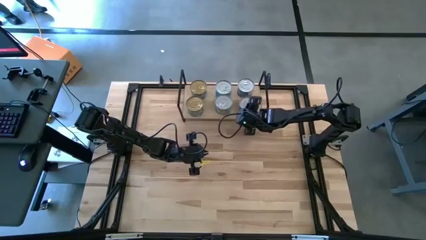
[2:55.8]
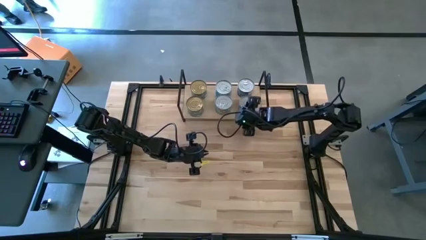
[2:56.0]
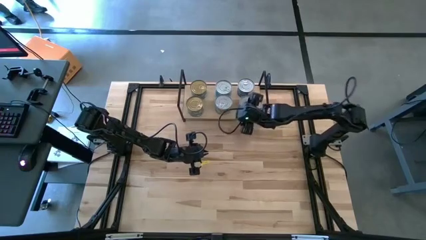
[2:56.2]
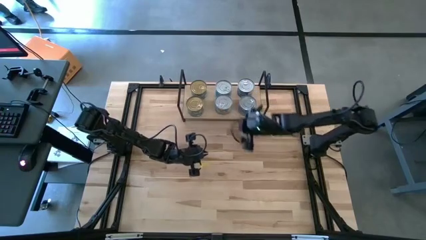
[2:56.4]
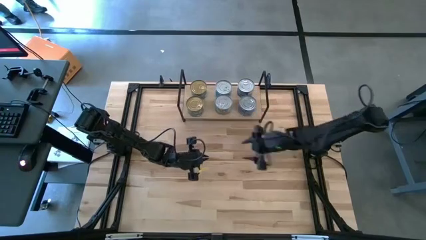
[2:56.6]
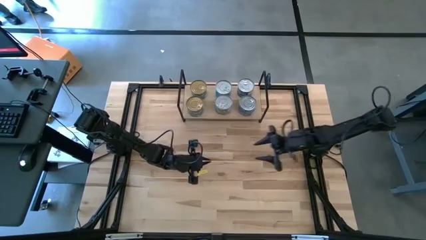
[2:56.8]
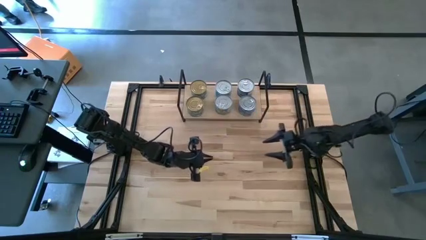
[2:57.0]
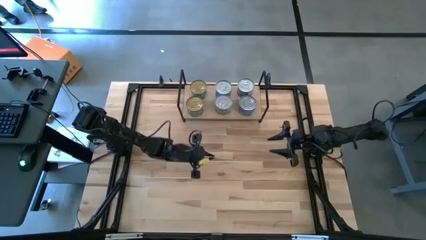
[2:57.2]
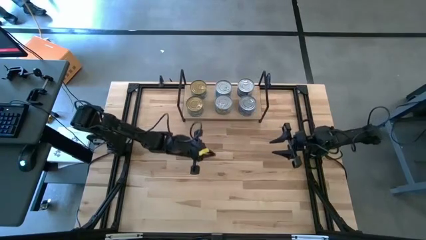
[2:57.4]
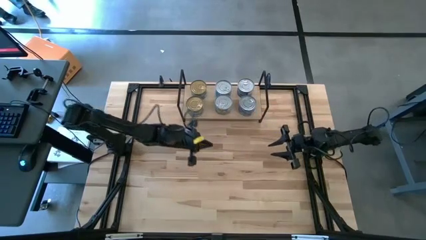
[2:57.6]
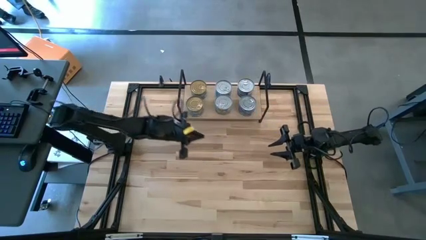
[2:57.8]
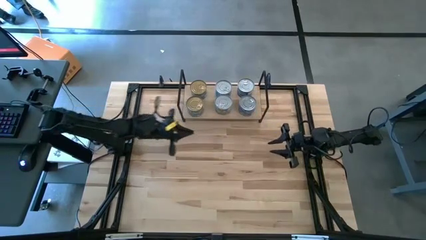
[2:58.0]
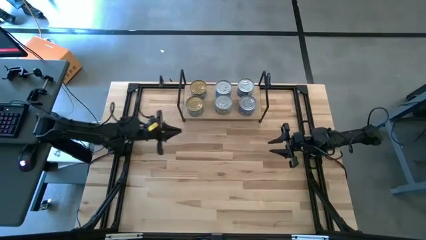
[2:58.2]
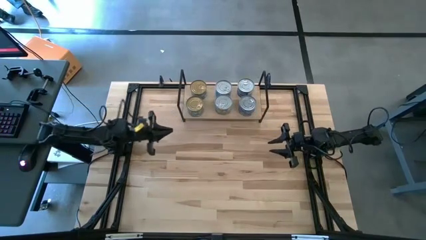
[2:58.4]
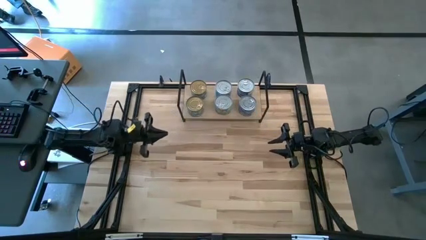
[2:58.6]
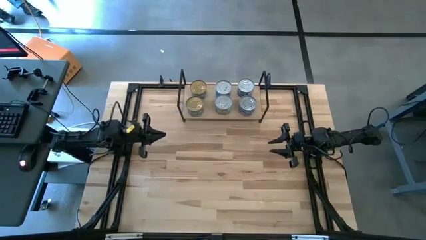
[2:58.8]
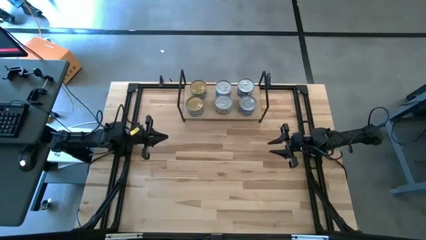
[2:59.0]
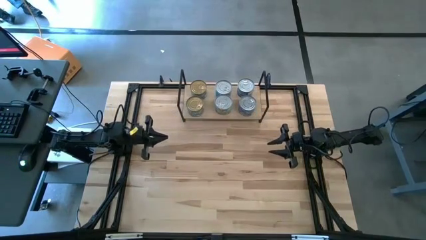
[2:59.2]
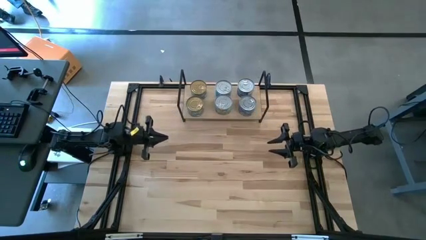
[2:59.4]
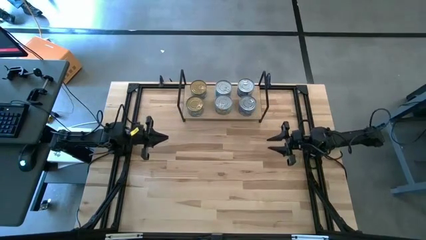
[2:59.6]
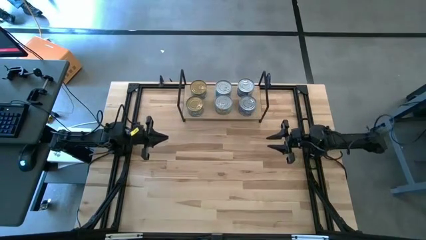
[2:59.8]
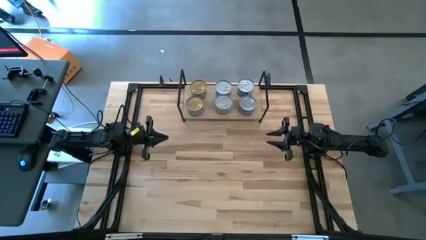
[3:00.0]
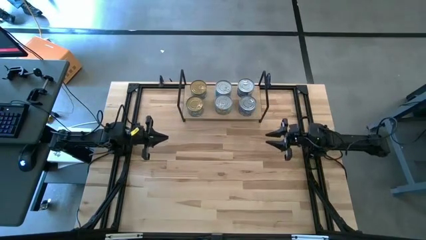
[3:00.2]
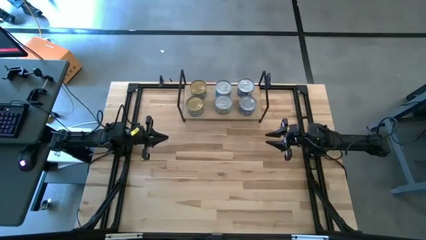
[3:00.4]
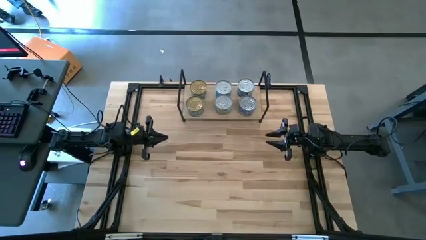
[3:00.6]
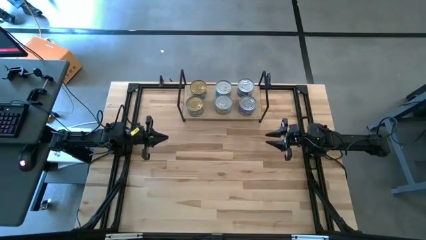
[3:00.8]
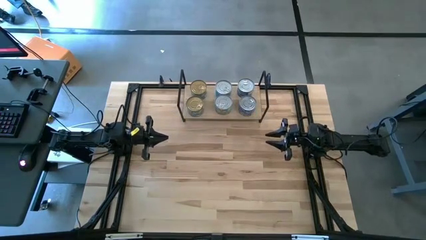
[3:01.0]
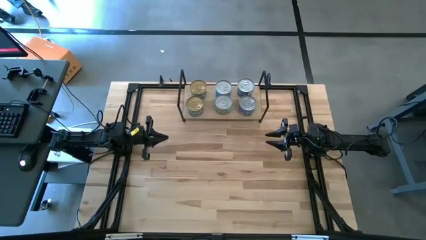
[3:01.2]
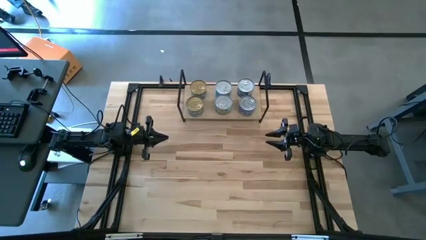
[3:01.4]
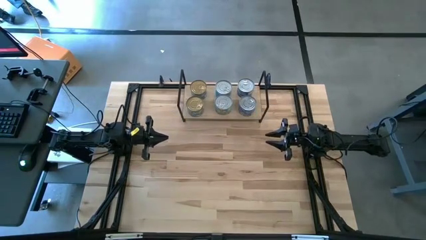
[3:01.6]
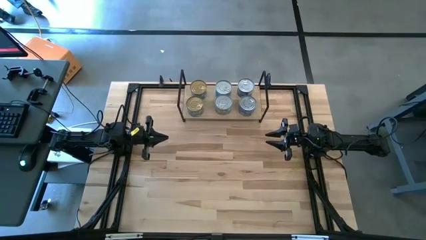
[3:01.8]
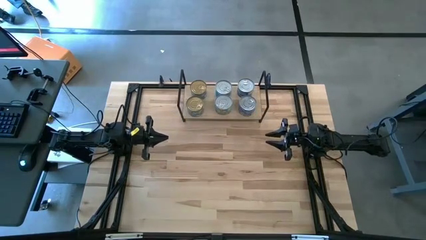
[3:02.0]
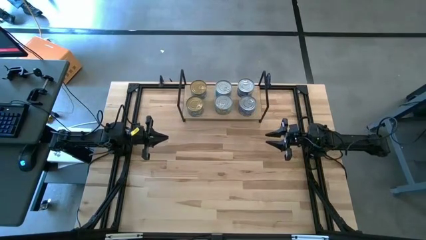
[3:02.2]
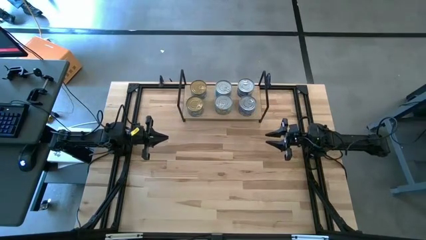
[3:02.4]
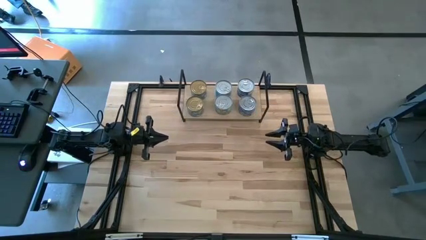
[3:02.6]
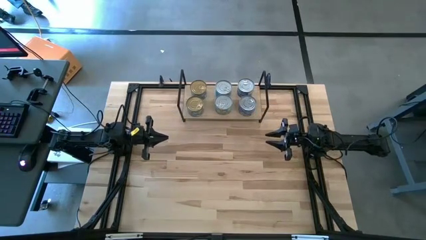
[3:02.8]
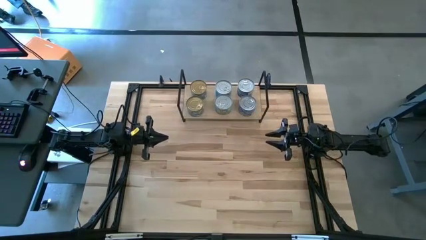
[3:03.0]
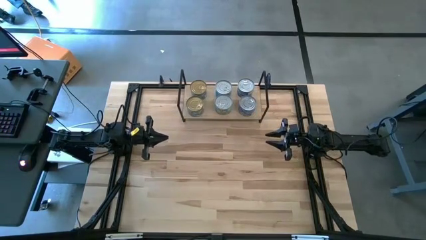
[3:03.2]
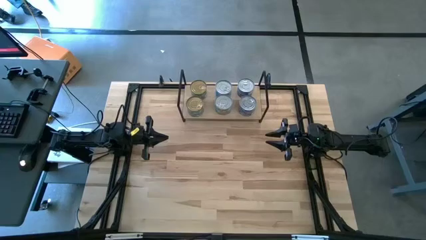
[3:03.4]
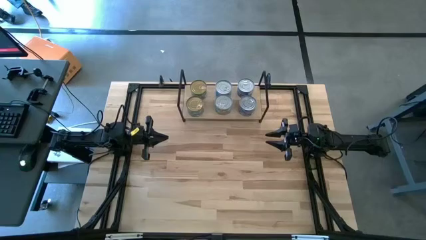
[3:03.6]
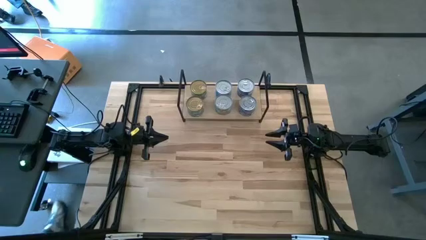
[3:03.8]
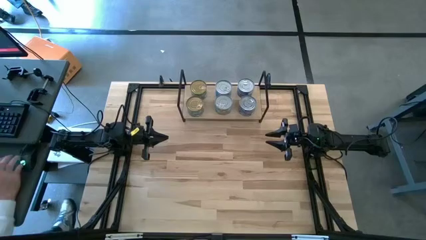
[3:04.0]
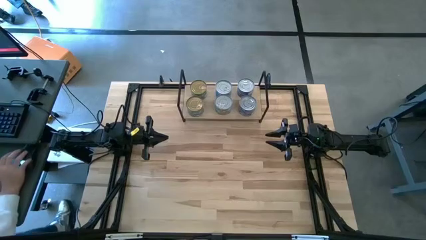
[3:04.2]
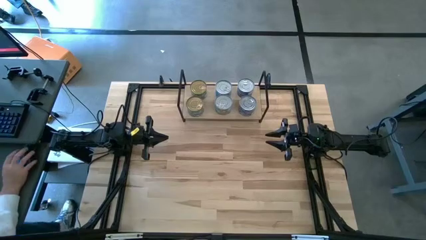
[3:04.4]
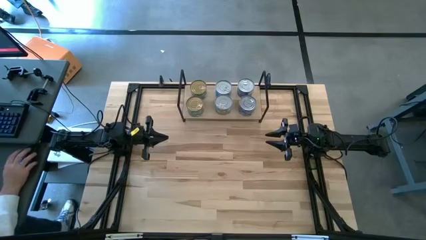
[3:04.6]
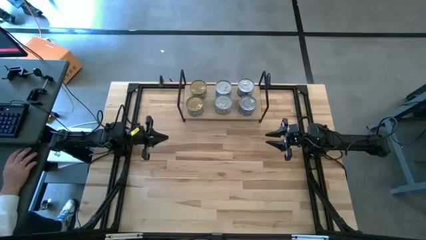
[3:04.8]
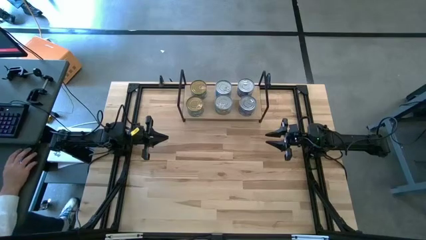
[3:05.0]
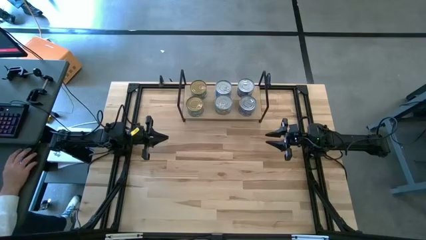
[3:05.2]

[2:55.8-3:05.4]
Task: Stack canned seafood by type on shelf
Return to Home Position
